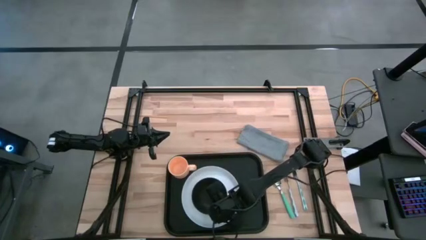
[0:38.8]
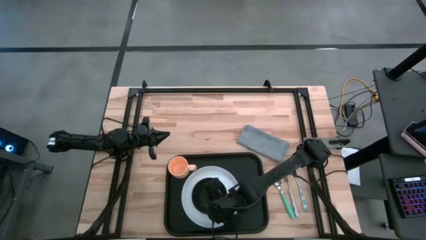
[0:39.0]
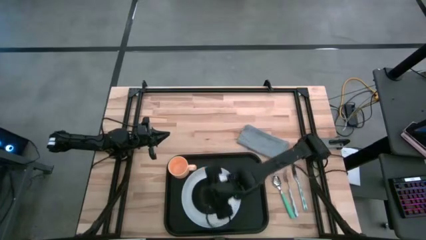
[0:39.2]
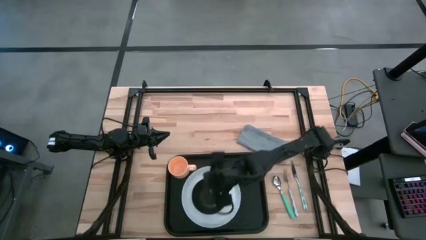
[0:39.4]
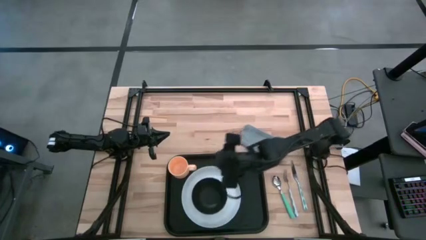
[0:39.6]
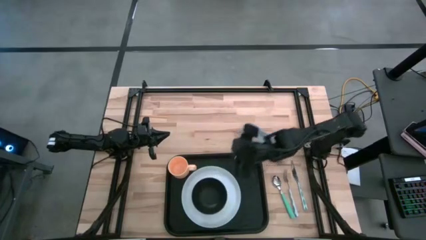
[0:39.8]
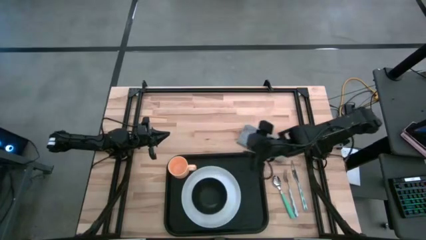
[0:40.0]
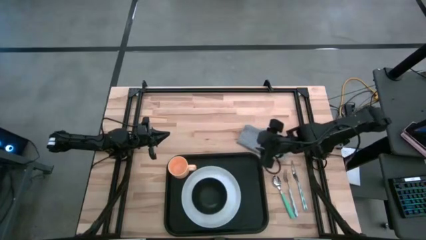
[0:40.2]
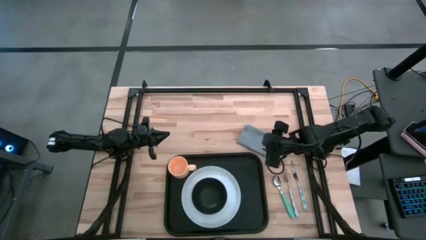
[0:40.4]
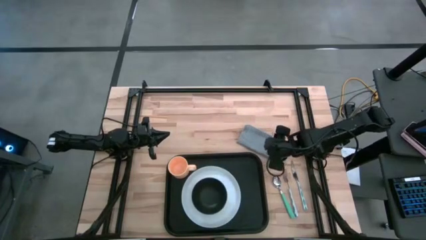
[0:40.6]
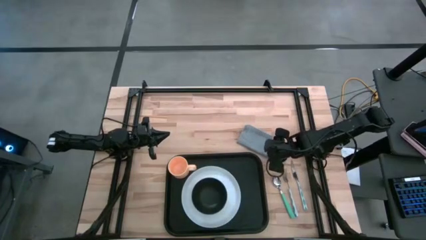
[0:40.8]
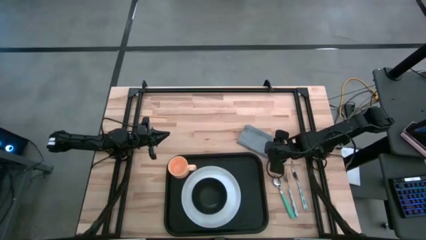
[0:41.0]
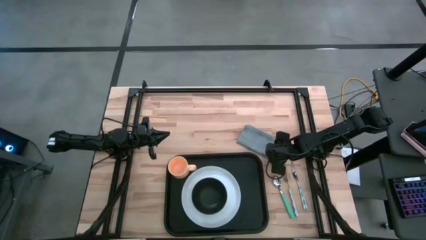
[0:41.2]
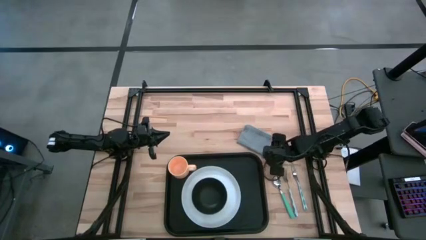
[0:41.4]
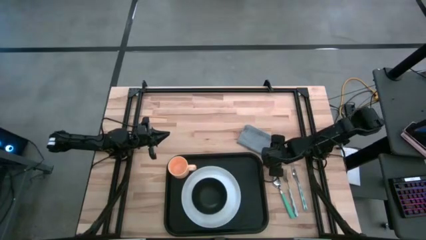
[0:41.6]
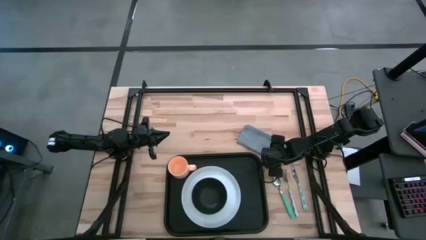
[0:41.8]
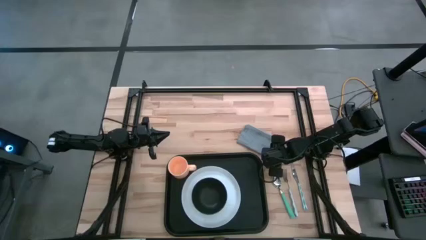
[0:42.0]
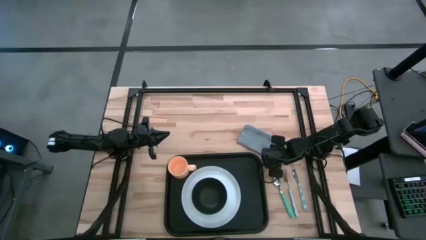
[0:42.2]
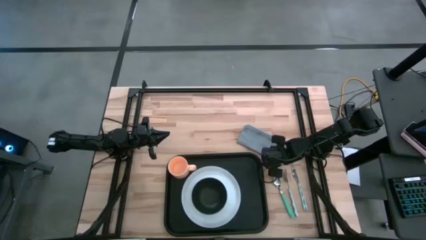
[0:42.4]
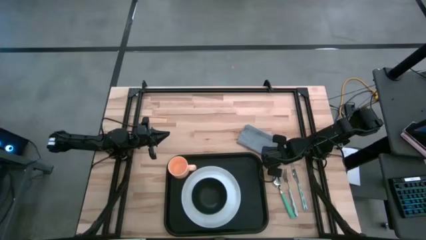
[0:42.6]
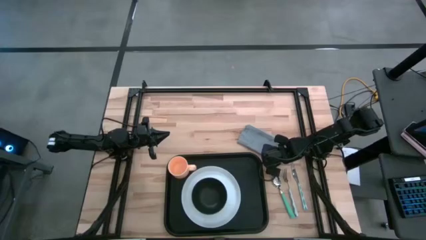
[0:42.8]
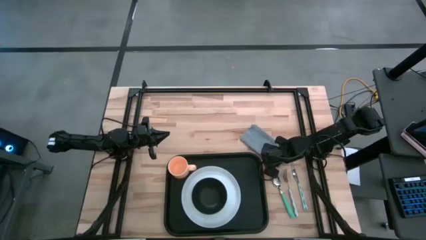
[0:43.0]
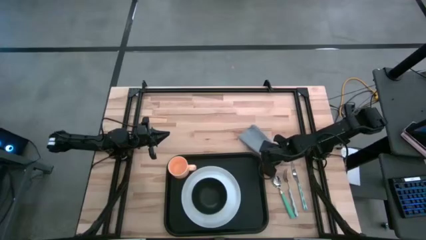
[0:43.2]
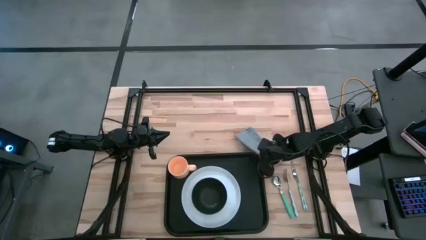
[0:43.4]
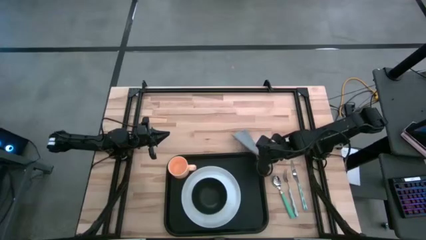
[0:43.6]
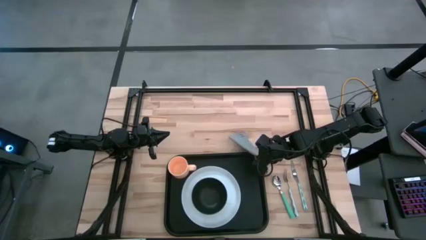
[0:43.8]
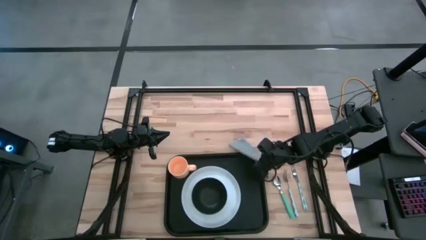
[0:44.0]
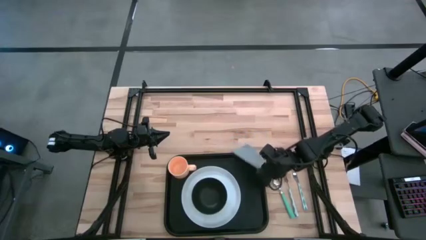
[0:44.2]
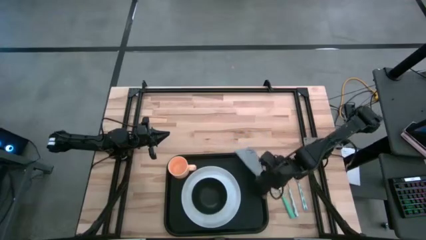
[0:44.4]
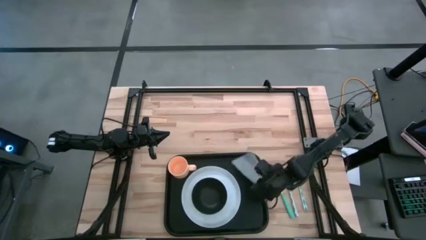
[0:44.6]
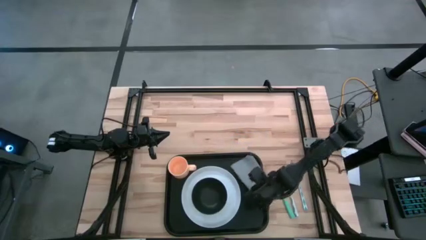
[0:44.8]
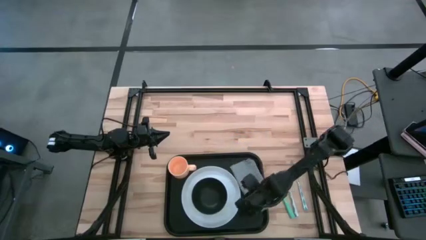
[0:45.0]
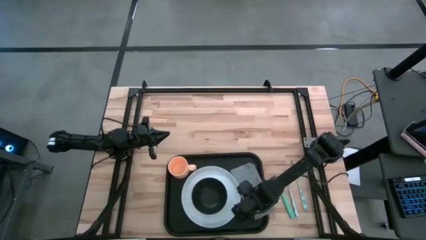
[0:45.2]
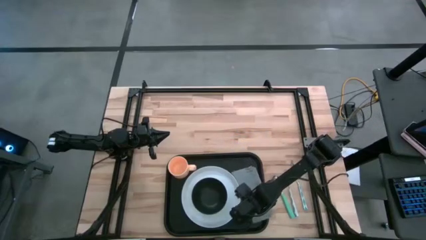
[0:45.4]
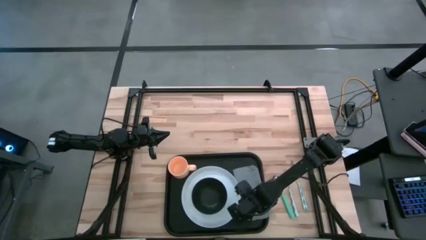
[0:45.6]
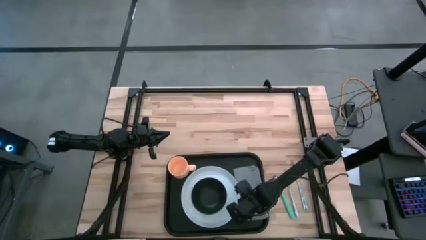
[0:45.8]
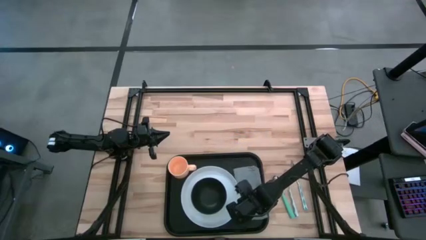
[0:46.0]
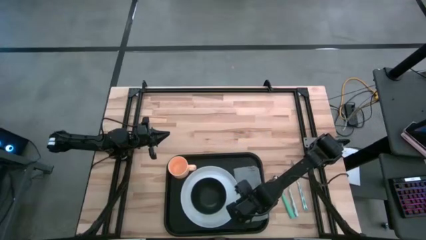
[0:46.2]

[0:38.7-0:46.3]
Task: Set up tray
Put the gray napkin on the black tray to the right of the white plate

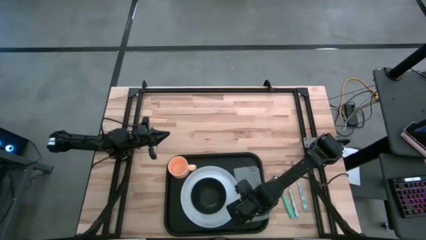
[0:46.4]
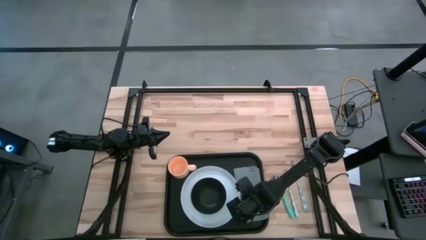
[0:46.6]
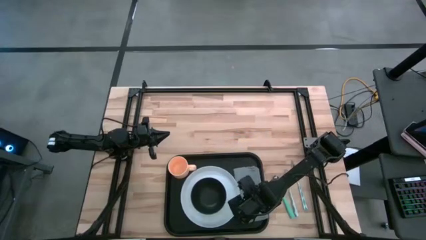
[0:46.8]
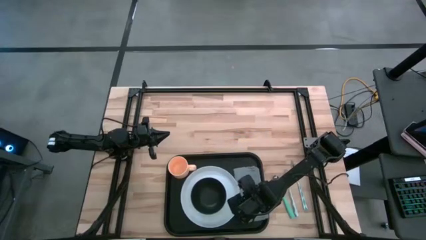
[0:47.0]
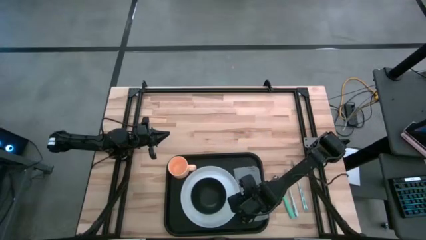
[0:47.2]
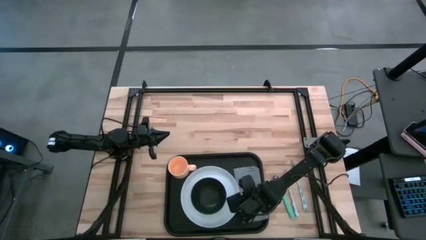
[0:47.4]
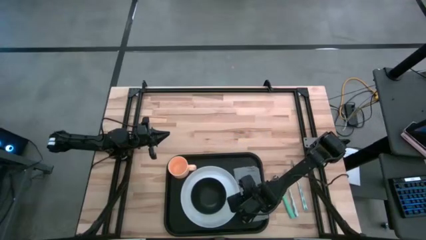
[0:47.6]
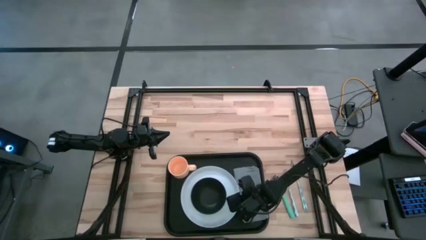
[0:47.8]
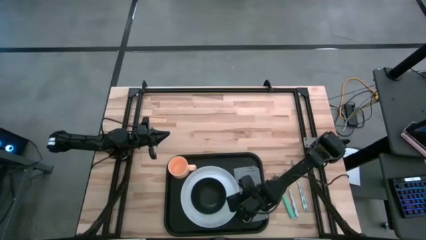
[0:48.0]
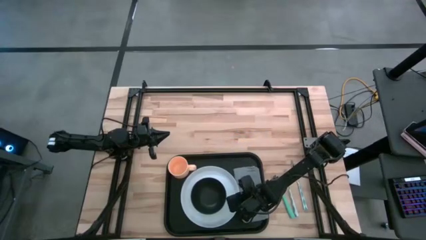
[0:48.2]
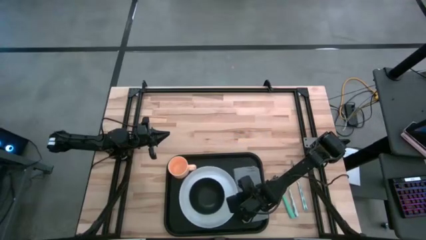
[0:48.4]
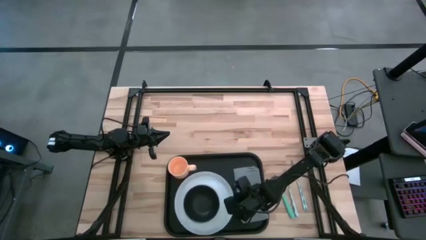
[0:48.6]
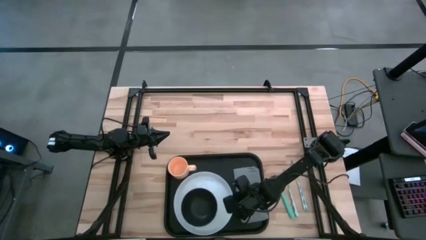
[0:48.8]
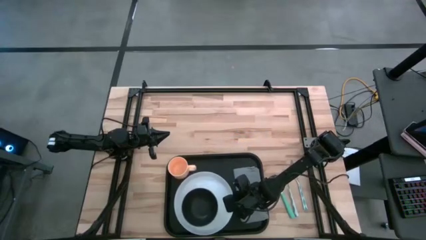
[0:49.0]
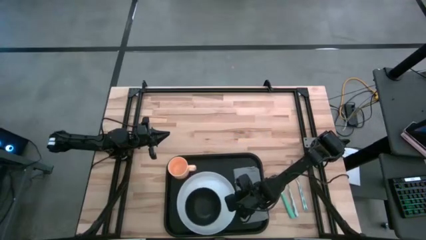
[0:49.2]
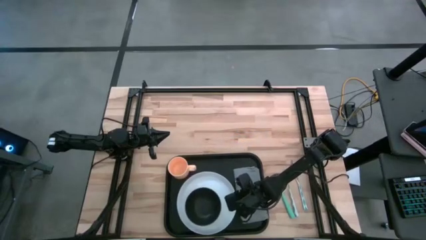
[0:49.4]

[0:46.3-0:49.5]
Adjust the white plate on the black tray

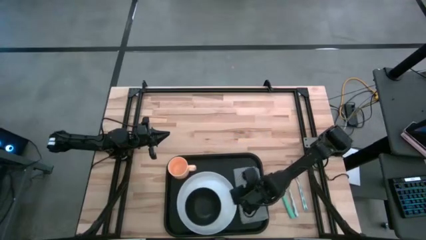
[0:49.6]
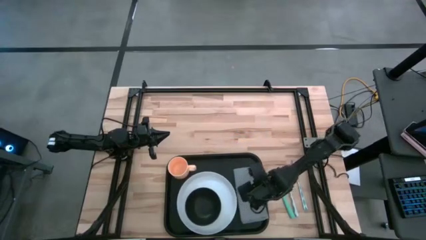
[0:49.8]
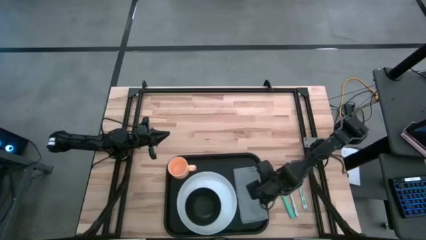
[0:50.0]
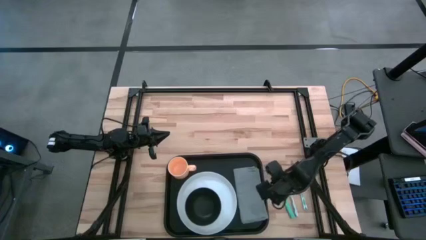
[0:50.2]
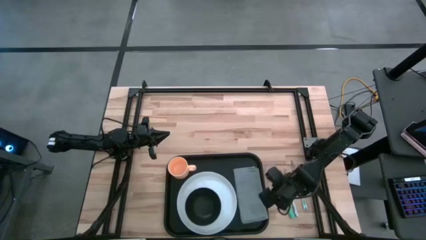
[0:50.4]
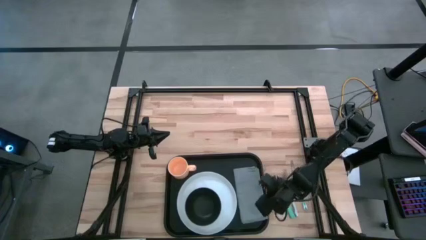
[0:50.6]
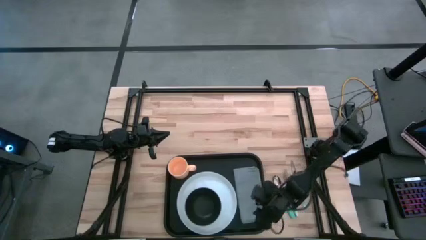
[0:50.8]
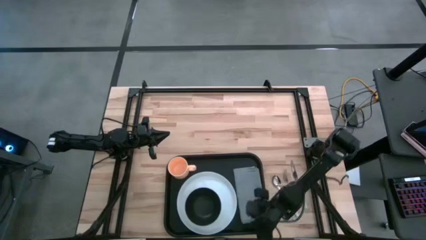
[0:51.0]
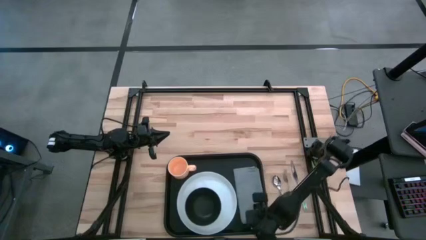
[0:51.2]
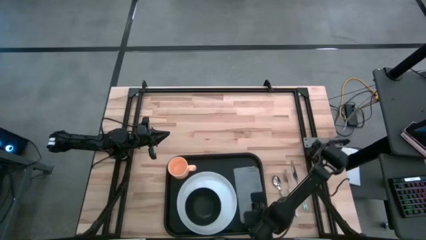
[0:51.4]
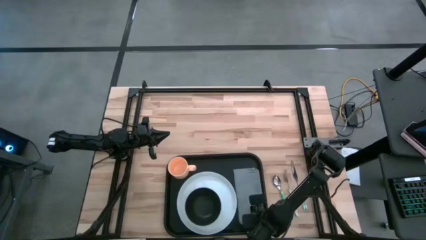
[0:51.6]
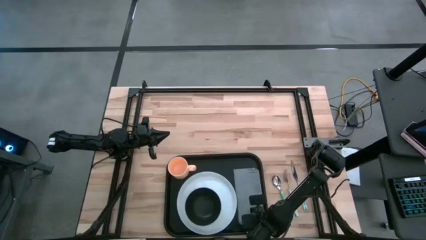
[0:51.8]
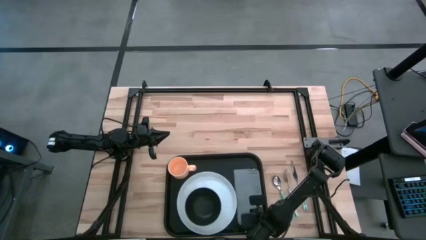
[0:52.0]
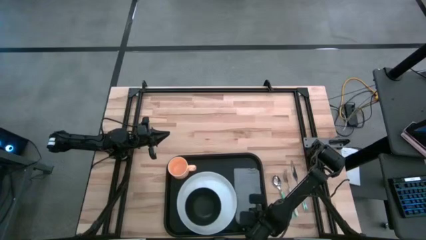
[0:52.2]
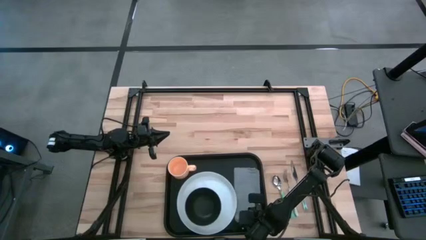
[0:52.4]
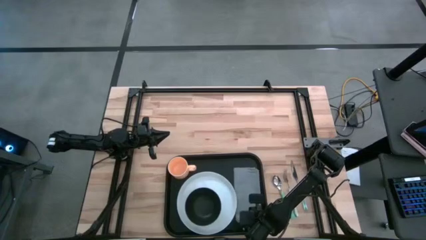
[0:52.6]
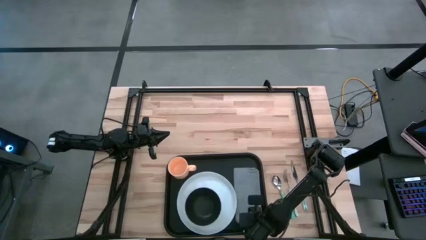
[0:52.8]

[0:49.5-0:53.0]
Adjust the gray napkin on the black tray

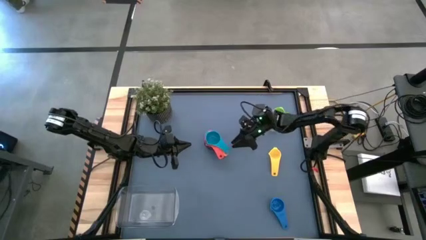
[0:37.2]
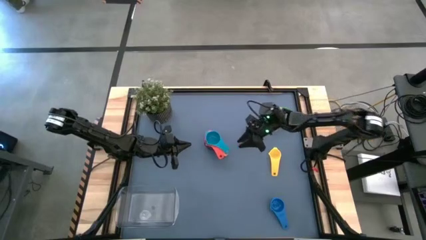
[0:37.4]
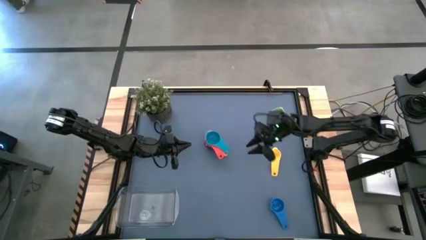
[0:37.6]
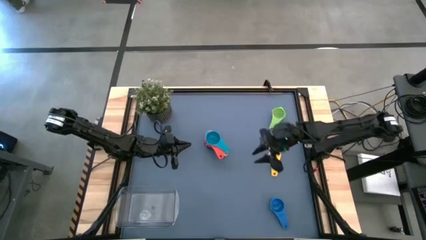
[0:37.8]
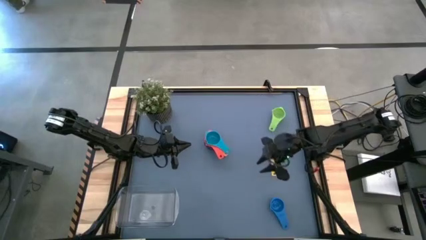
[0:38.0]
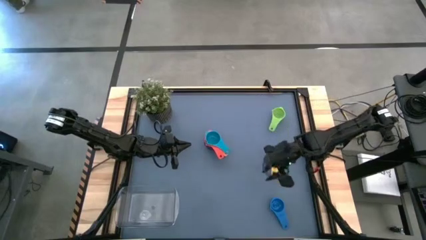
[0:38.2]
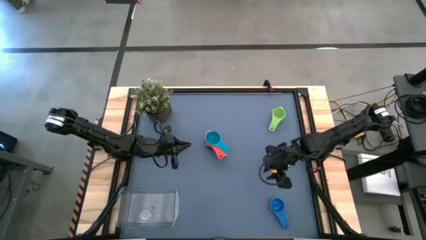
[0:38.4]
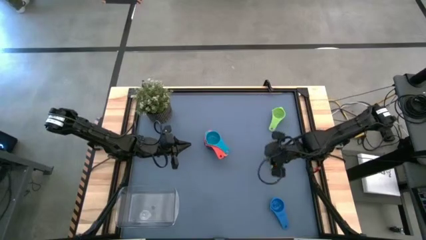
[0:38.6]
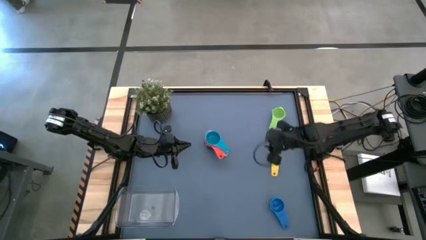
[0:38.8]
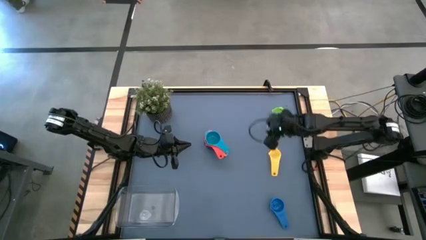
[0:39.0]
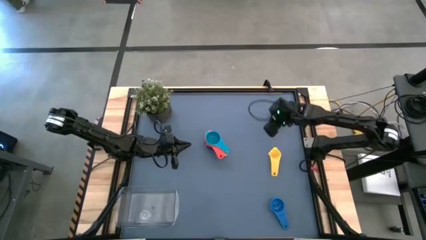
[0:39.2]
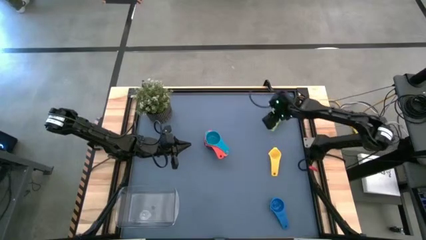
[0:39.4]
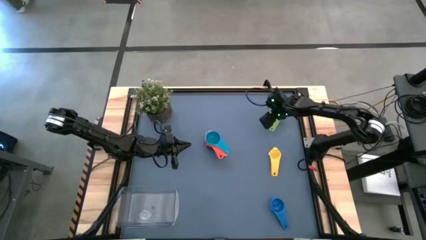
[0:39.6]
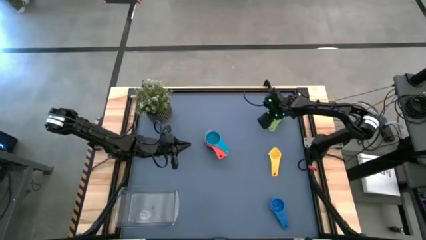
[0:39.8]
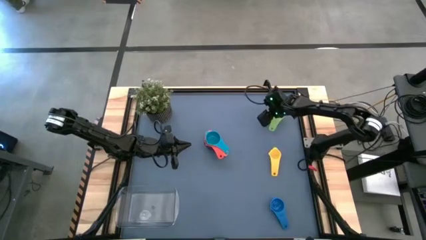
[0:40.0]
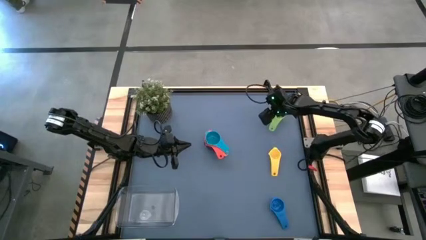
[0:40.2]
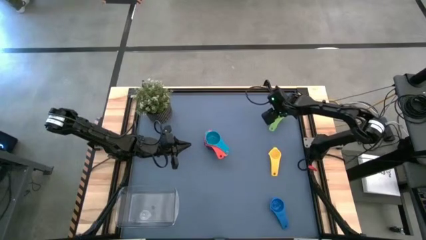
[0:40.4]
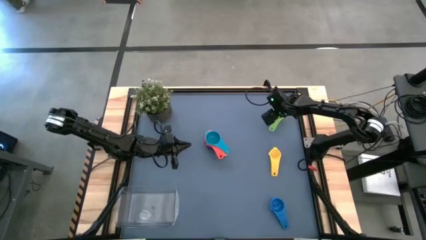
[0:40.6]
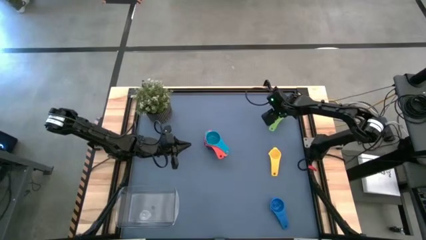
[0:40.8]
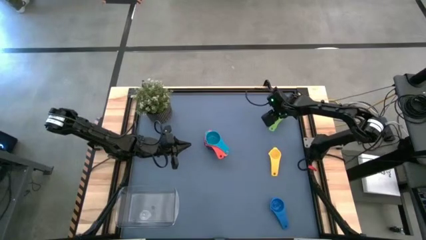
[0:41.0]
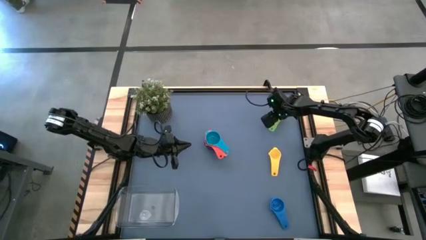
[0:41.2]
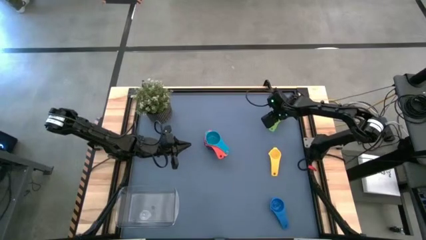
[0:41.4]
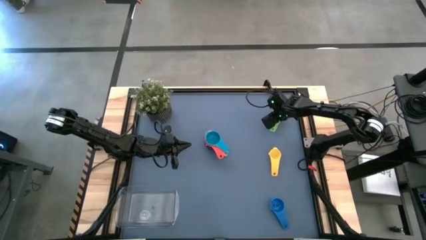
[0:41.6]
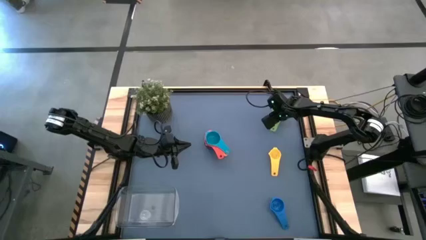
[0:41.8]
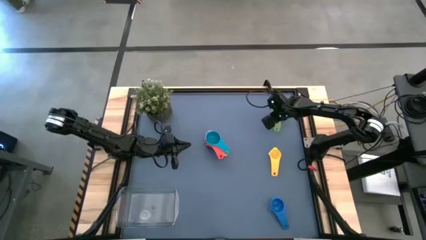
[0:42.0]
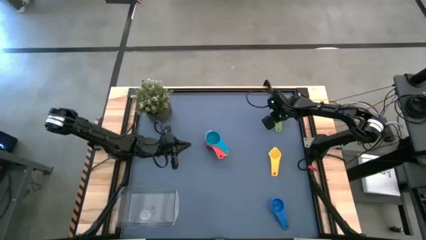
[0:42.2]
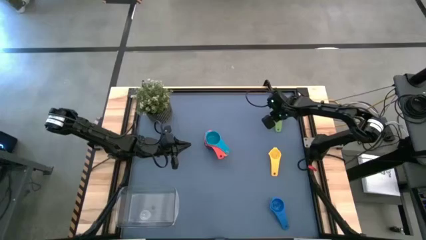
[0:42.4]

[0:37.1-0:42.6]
Task: Nest measuring cups in basket
Stack the green measuring cup on top of the light blue measuring cup
